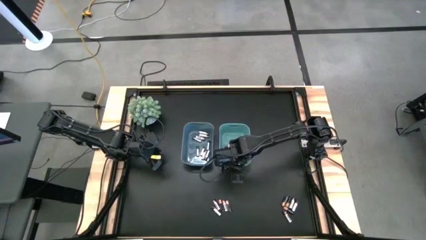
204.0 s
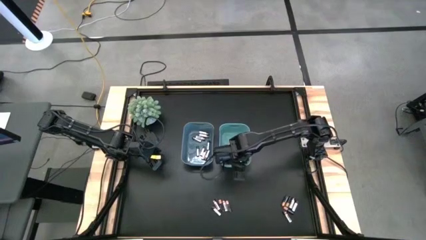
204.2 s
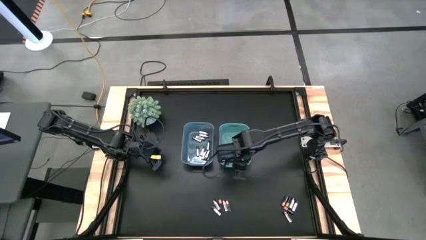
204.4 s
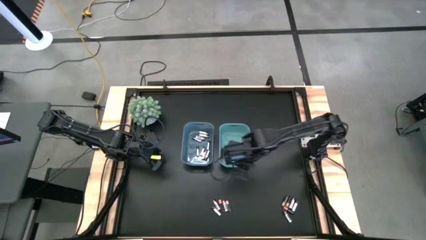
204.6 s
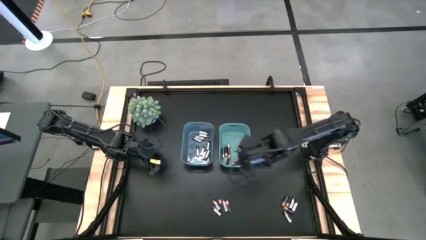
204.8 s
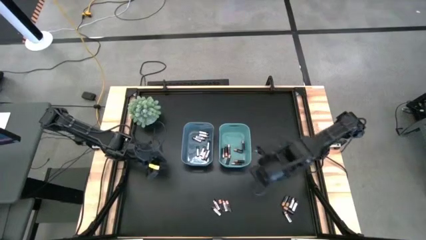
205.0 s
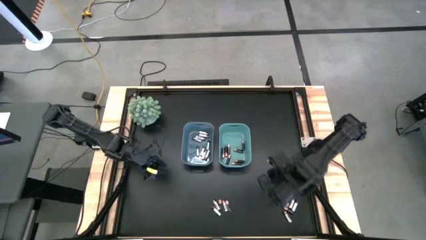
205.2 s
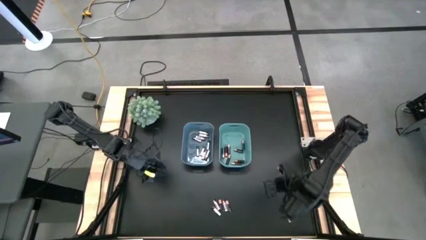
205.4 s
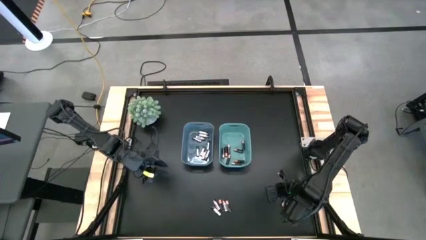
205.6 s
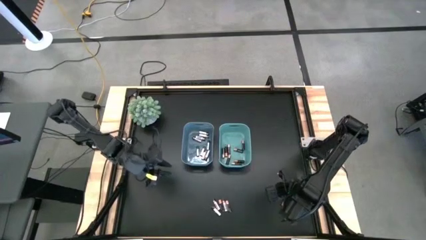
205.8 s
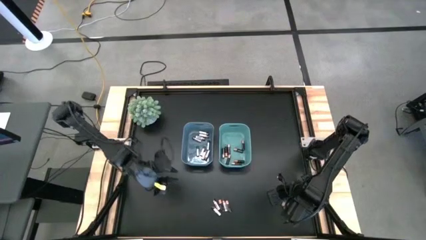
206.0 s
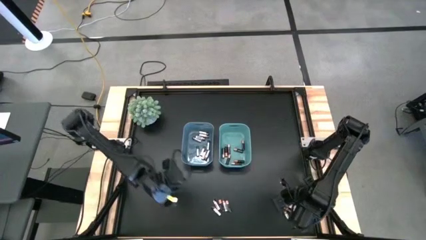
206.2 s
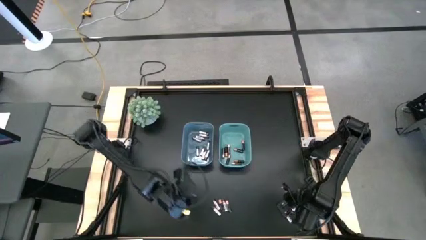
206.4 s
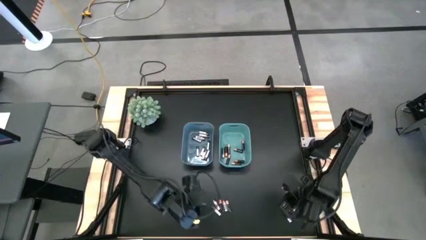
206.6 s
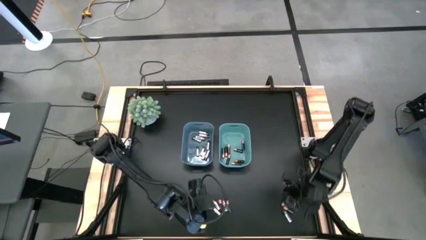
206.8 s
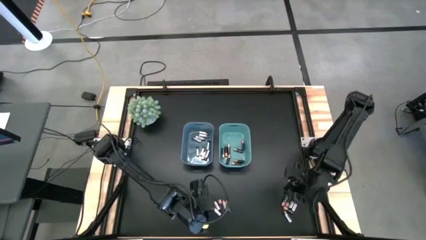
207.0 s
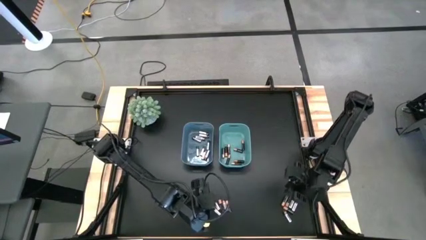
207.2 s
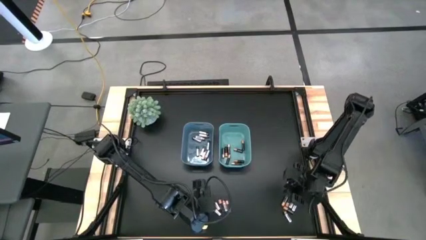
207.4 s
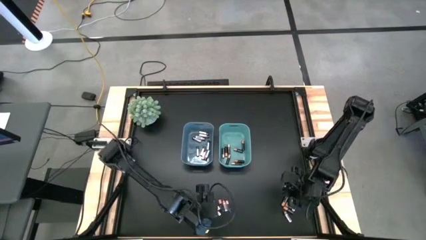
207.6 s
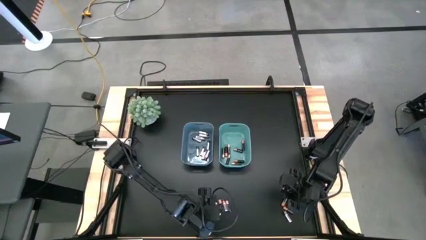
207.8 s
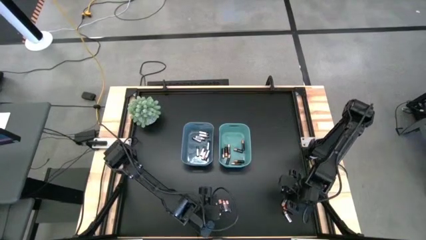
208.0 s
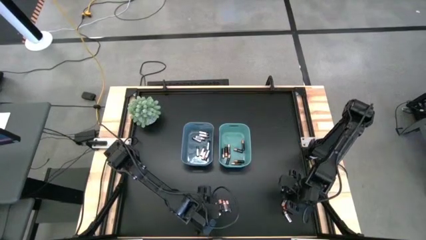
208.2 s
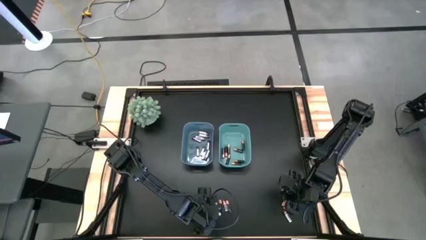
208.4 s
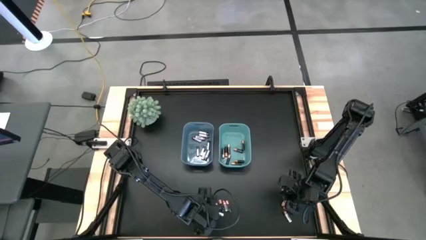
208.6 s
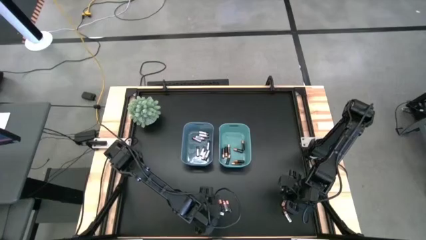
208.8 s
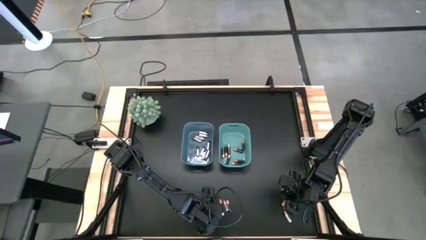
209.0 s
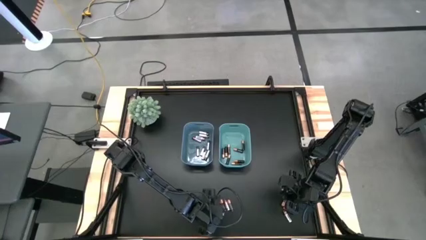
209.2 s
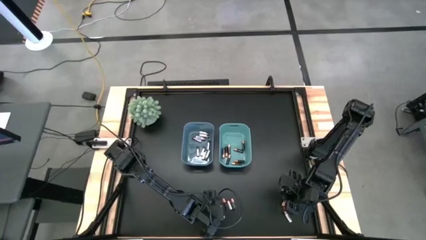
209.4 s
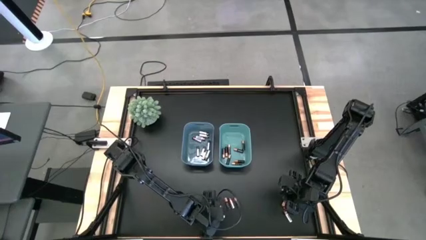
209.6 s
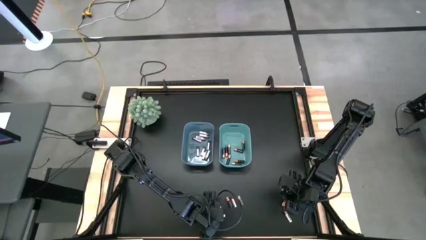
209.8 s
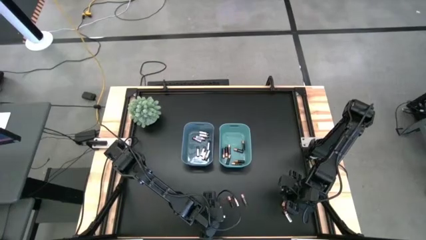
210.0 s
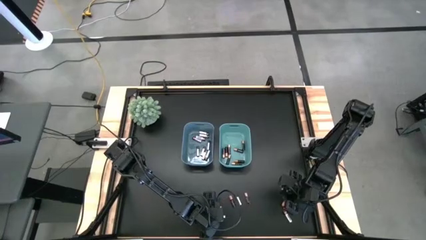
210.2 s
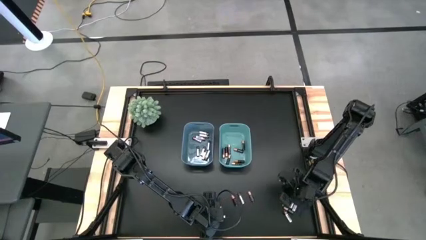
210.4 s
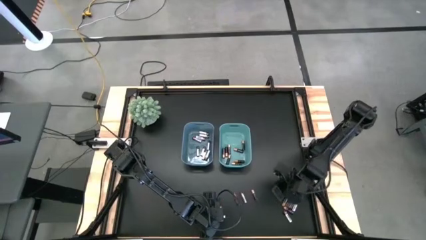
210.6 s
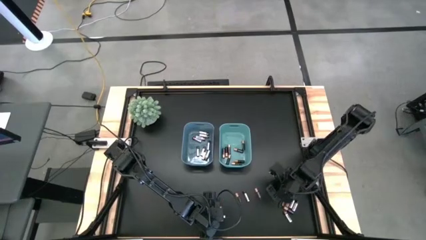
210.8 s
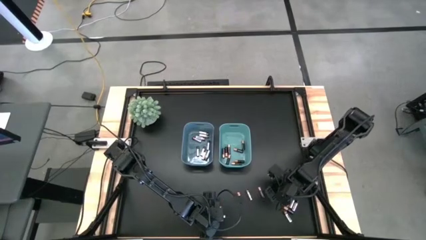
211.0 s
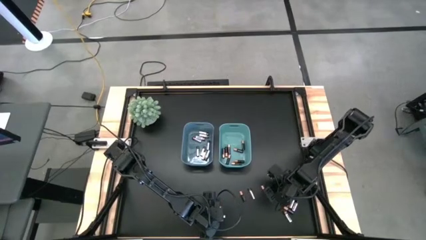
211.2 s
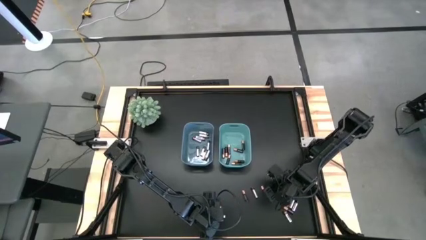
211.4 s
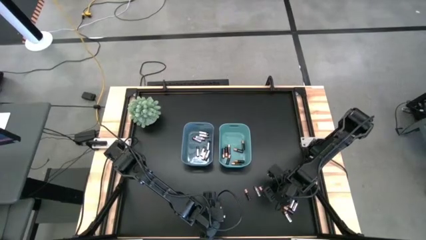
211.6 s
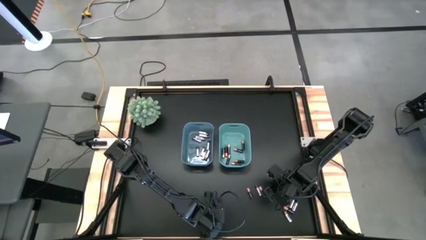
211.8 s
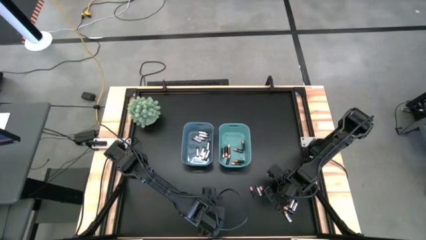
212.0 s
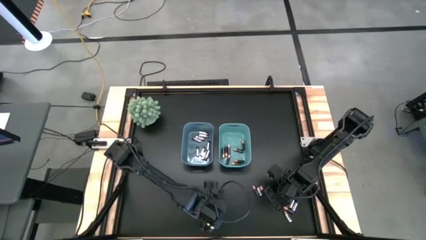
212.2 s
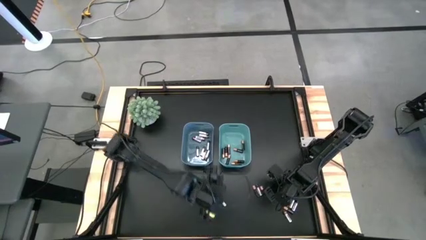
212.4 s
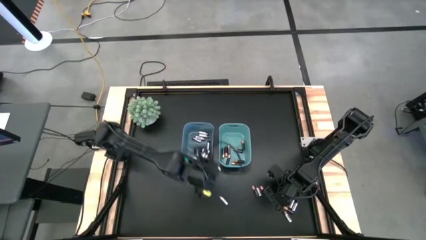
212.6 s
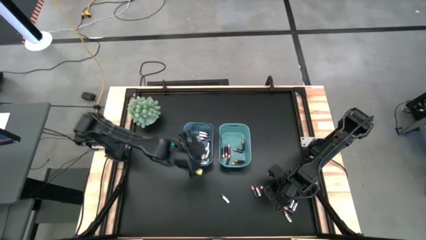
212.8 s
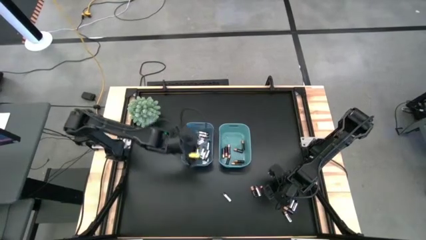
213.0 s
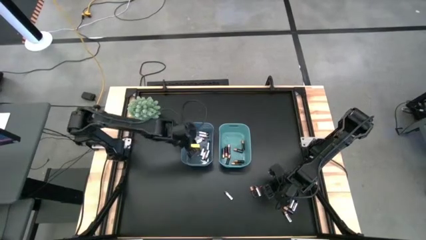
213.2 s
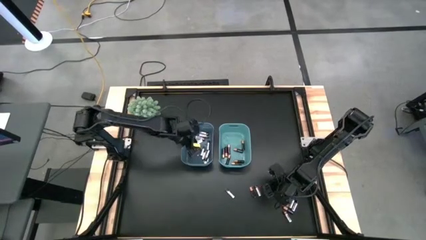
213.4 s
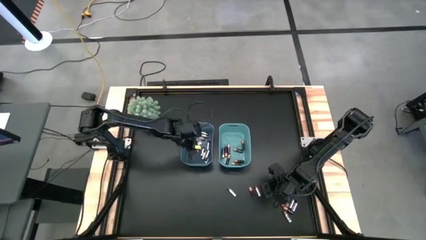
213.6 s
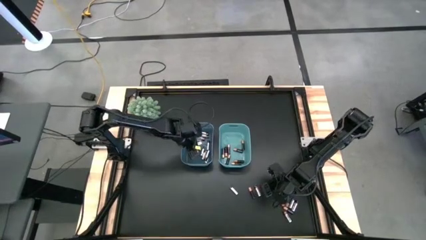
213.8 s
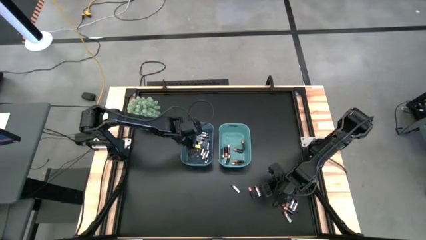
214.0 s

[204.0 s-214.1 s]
Task: Sort batteries
Put the silver battery into the blue bin

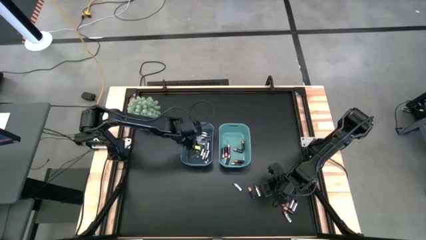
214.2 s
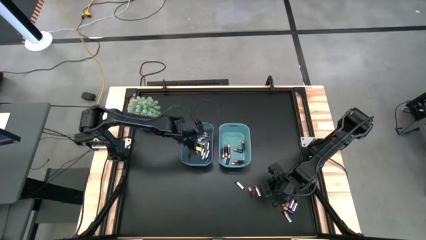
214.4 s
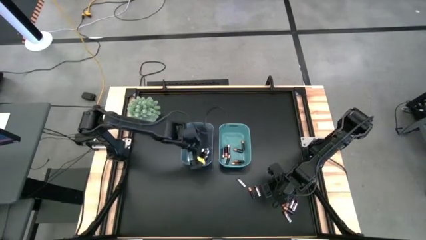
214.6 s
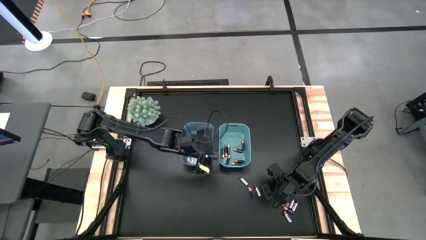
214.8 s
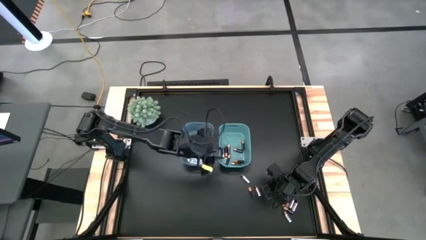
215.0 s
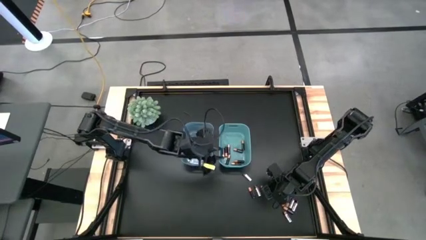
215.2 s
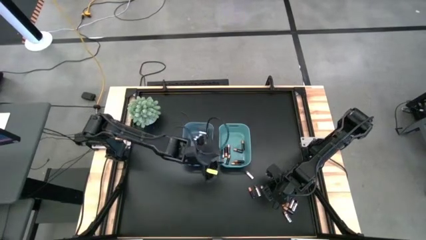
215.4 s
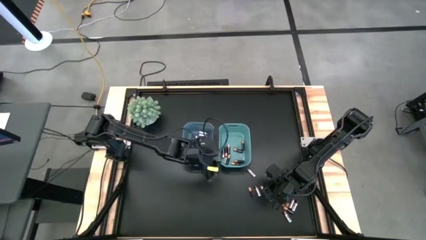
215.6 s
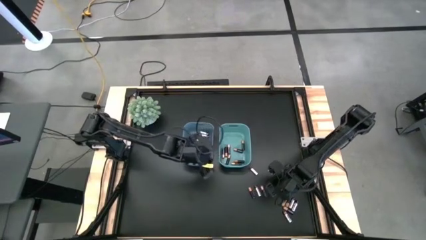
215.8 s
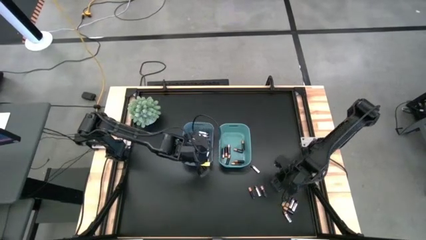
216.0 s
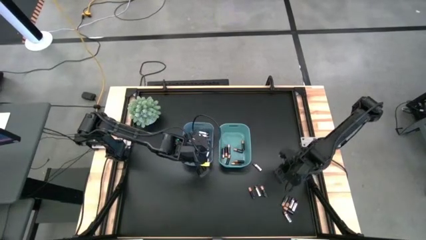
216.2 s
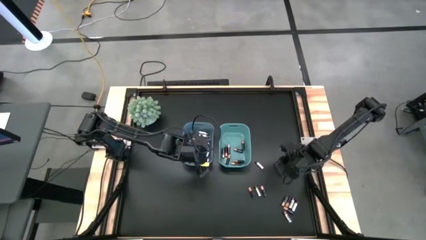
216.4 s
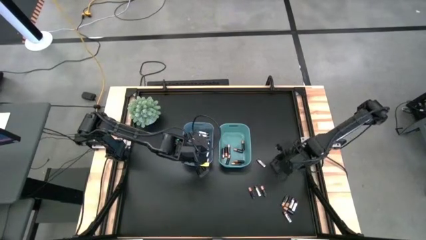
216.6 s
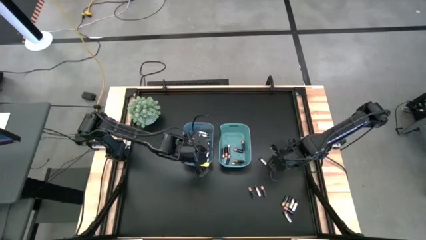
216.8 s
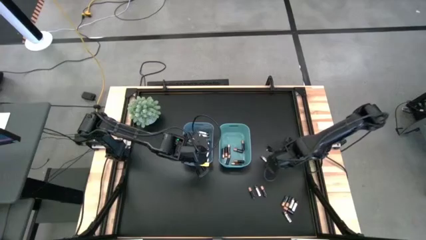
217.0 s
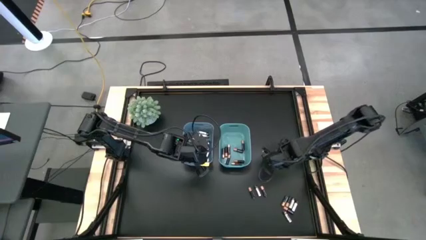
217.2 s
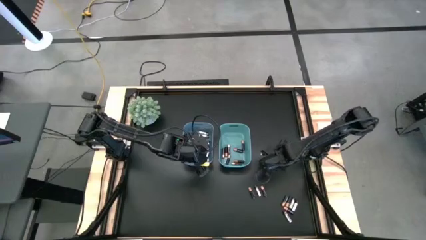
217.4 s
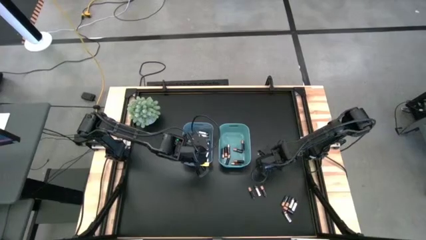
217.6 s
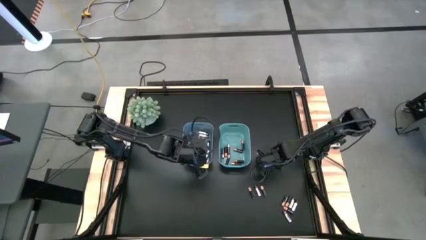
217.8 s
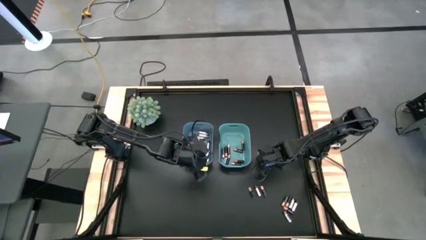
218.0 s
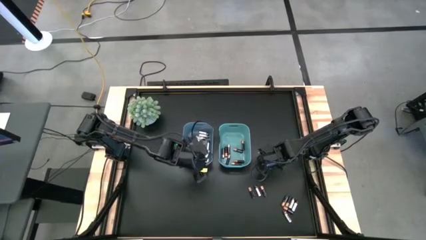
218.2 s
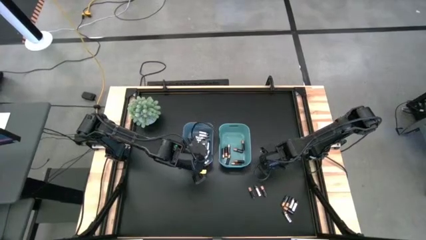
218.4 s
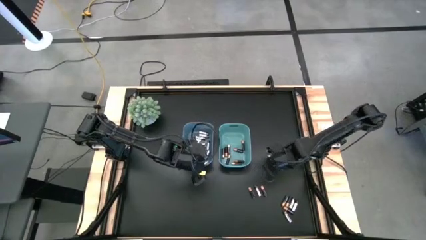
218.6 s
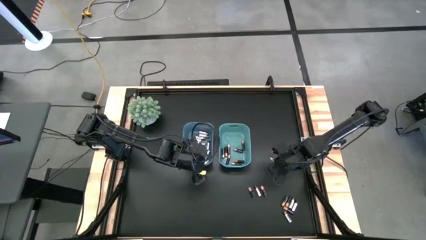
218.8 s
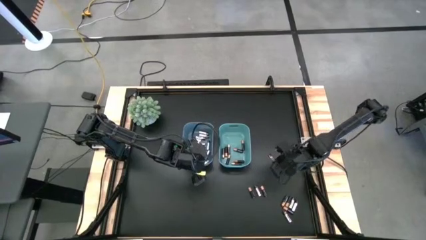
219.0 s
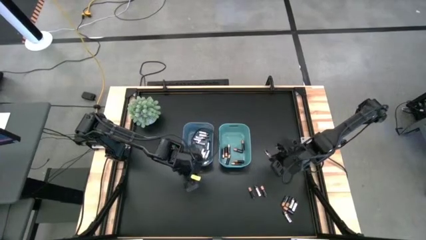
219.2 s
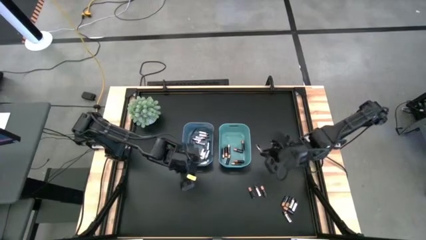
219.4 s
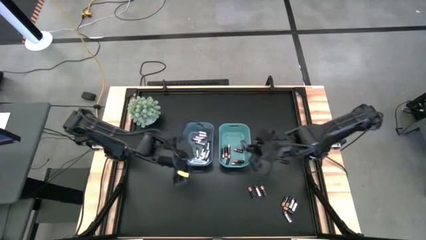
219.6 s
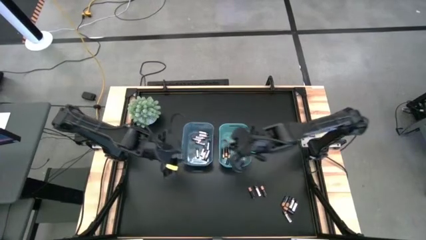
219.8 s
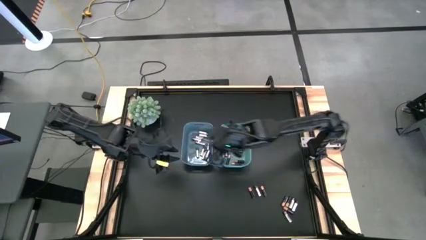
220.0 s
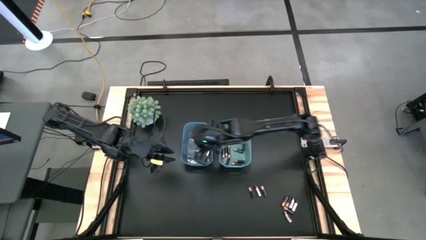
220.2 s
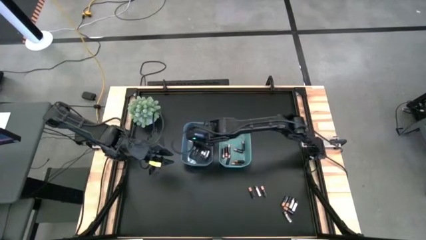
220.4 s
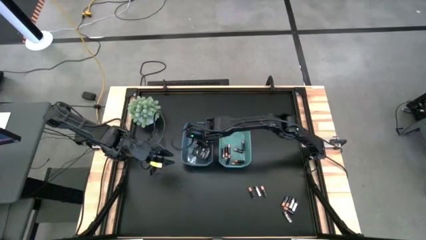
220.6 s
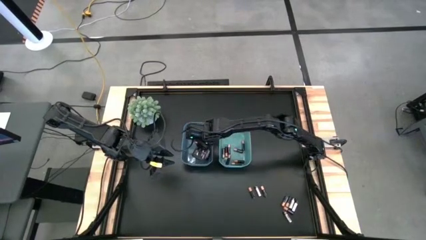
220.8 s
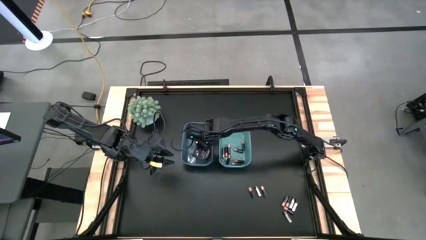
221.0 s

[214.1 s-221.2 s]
Put the silver battery into the blue bin

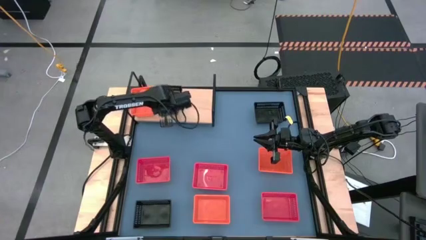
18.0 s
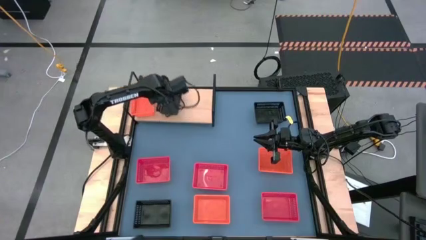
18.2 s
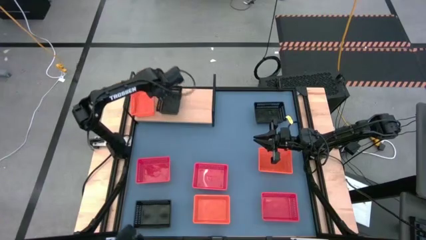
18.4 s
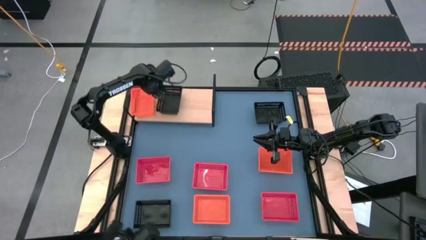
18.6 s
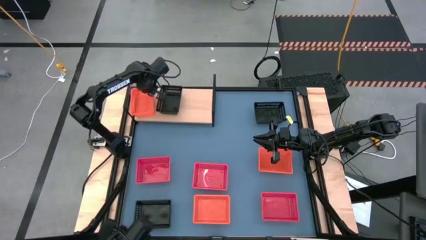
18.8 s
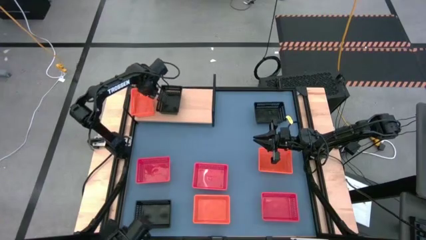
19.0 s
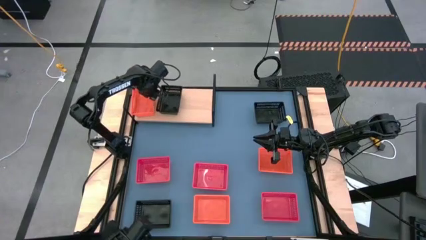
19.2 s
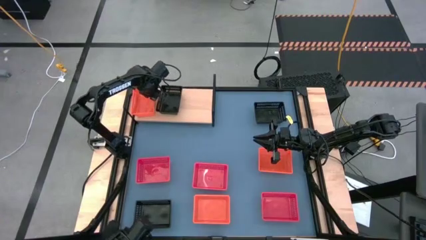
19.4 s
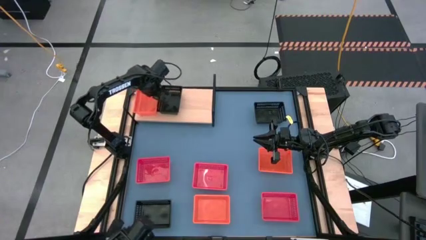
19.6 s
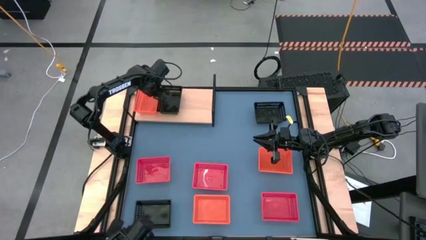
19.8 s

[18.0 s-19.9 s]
Task: Stack baskets on shelf by color
Adjust the orange bin on the shelf
